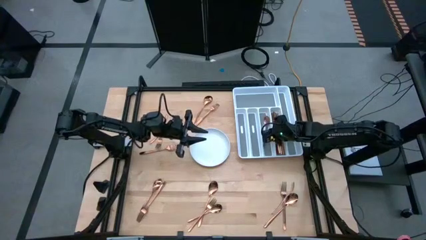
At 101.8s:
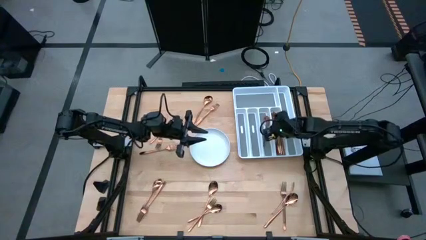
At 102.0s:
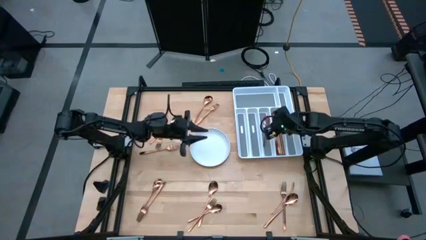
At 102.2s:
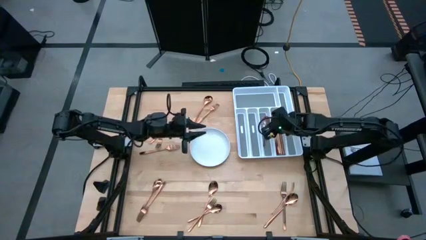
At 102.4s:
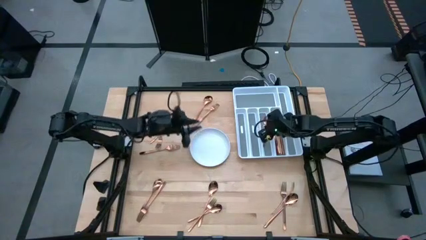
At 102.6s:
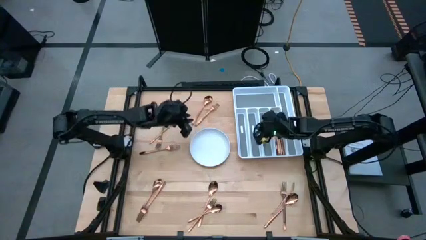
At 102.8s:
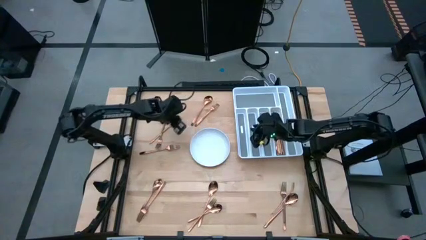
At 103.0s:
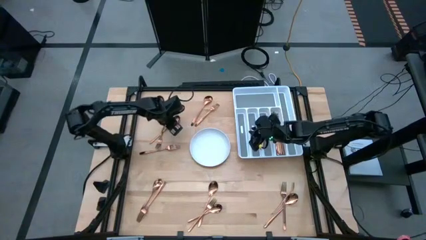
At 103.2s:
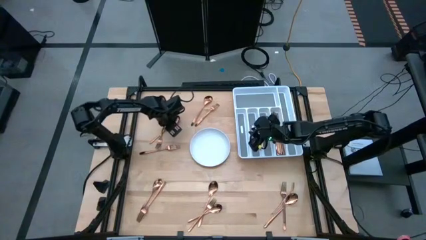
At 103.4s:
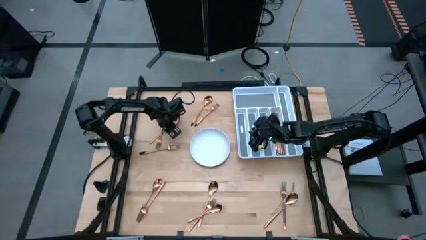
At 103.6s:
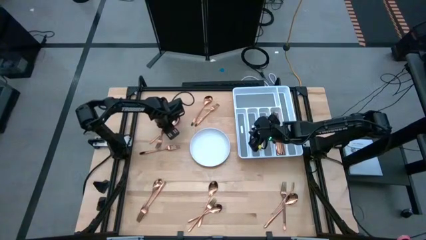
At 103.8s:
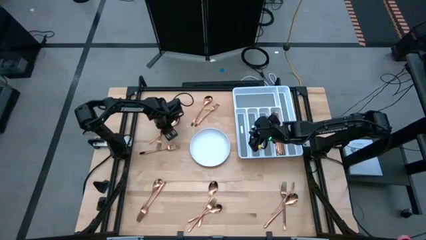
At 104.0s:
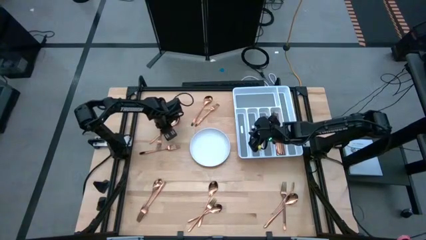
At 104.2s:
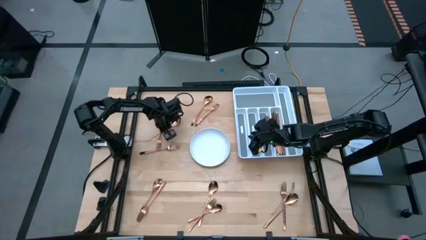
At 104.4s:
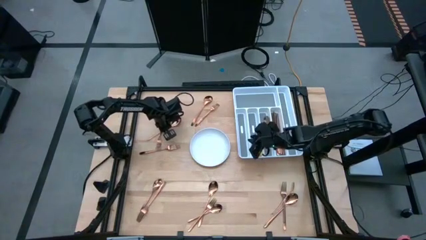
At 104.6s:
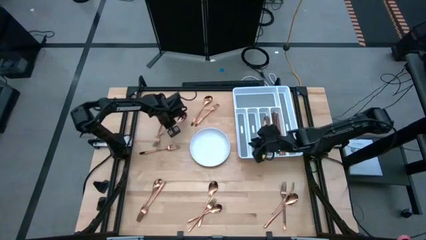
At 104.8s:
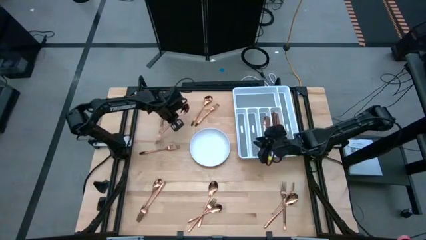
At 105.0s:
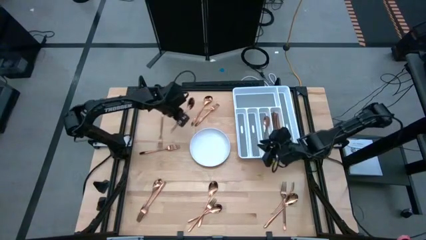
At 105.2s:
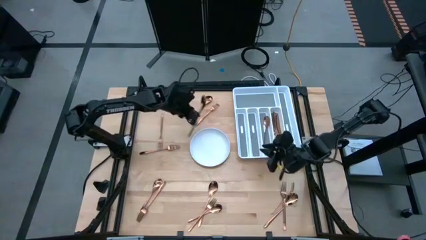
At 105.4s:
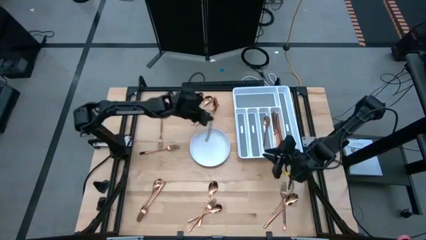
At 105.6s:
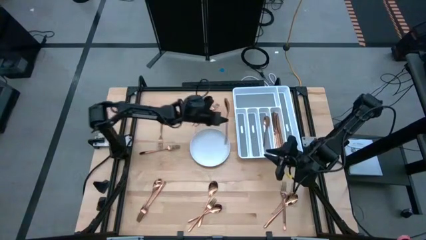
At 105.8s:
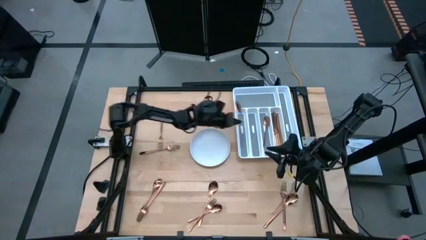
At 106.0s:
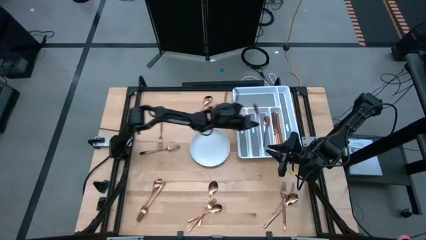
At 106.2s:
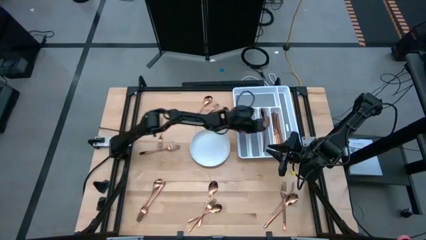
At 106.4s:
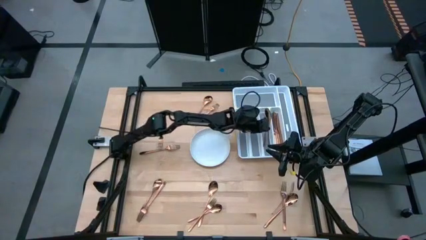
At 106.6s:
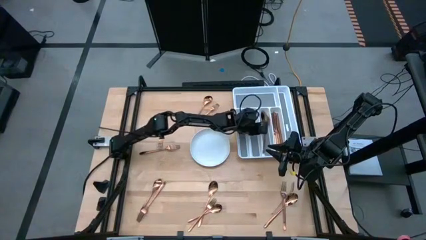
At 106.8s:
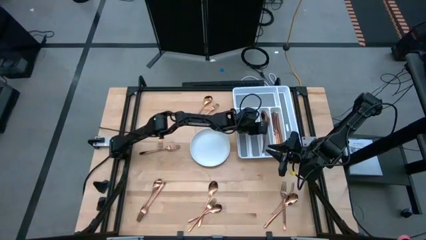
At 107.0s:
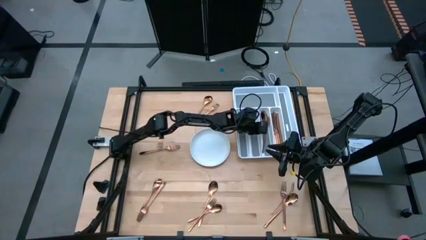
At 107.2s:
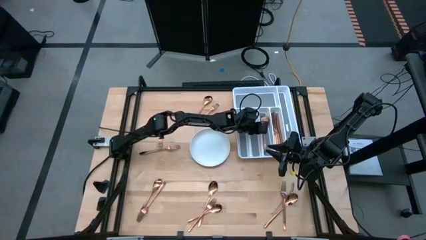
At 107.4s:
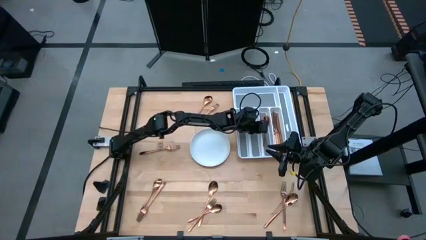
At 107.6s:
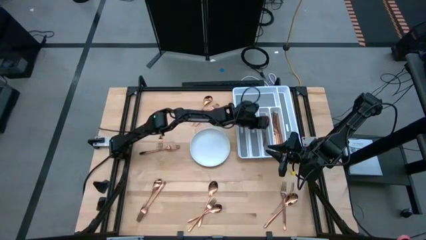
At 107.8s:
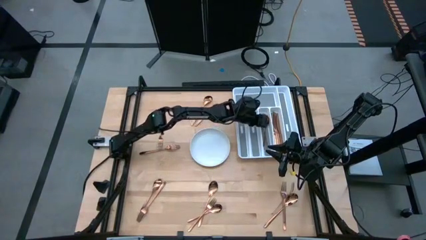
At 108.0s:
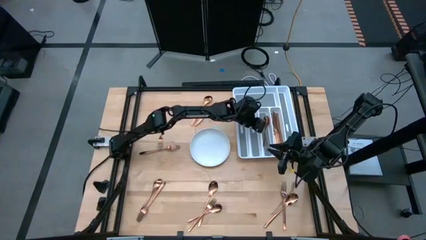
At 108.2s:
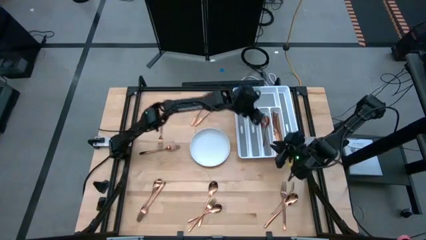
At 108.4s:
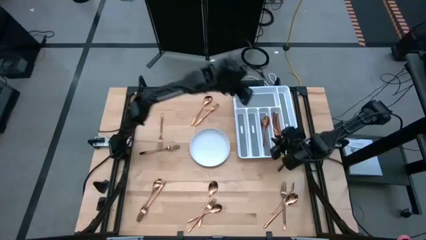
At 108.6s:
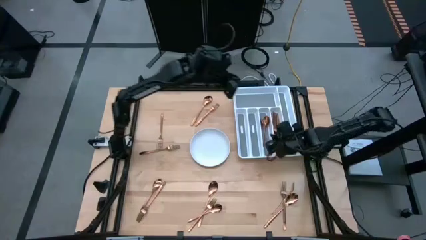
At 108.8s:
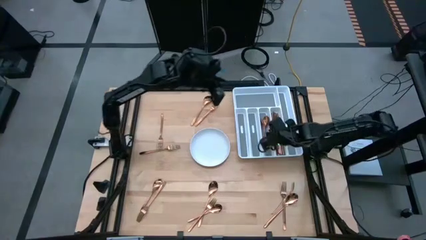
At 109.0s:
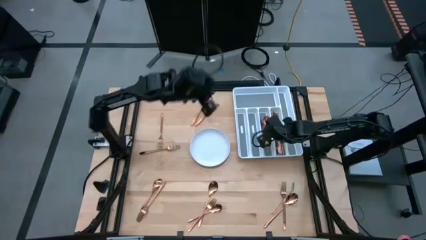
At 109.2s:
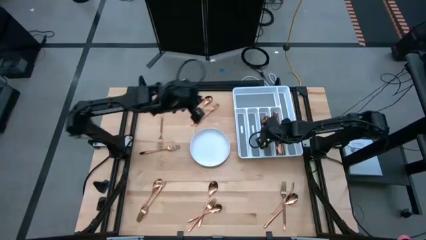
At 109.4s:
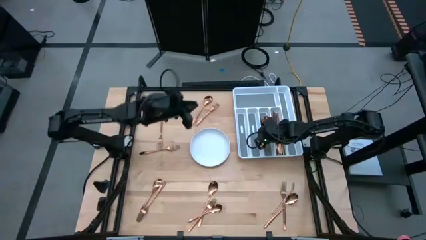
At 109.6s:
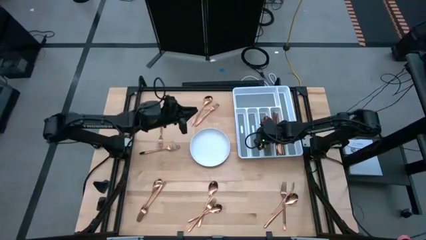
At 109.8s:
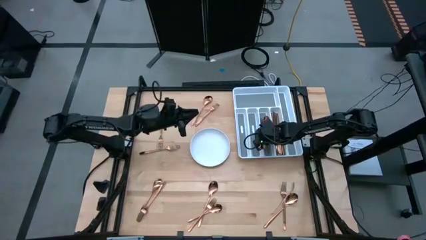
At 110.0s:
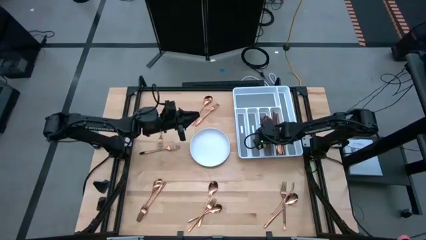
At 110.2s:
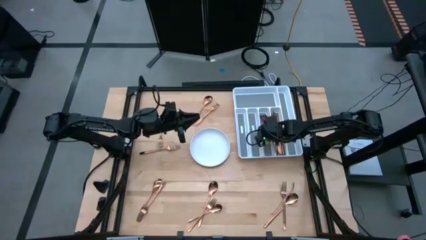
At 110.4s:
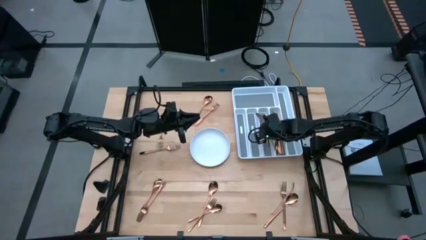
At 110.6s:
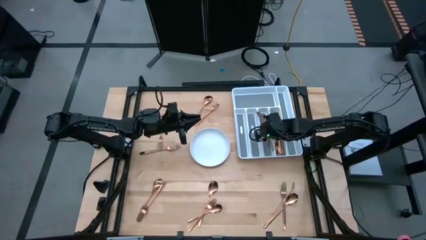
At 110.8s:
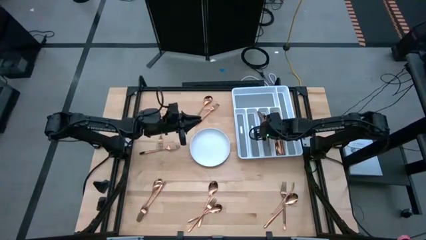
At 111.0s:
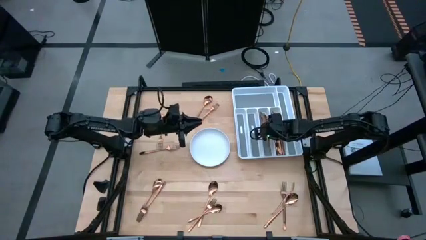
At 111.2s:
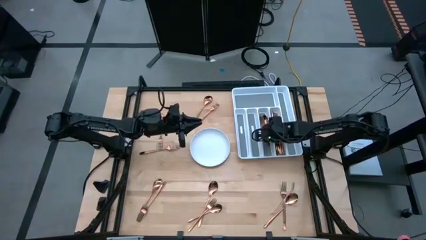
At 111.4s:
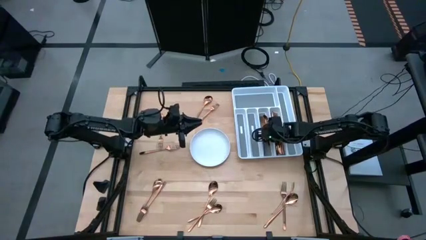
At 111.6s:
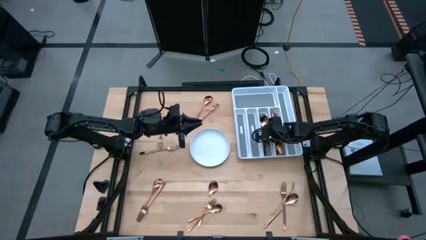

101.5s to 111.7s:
Task: Sort silverware
Put the spoon in the silverware tray

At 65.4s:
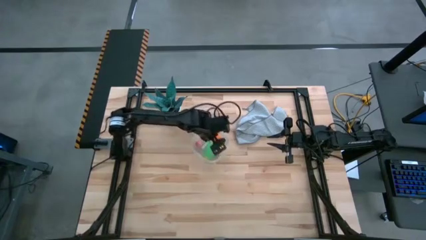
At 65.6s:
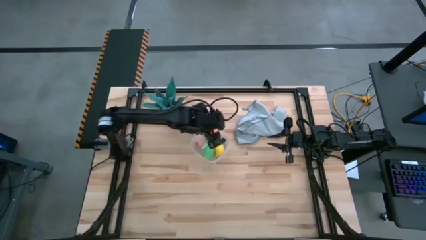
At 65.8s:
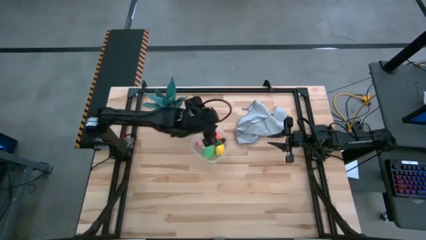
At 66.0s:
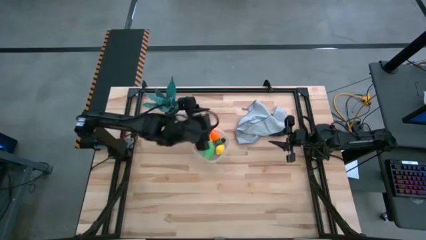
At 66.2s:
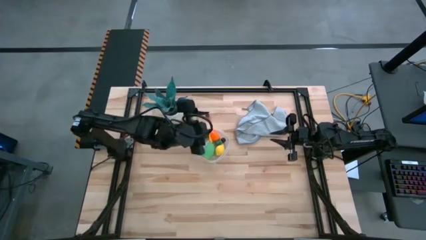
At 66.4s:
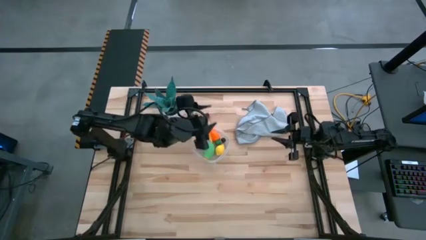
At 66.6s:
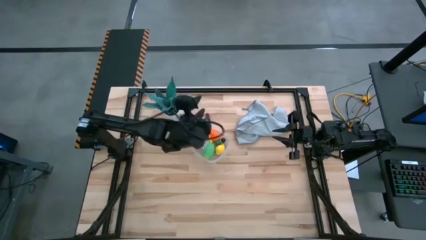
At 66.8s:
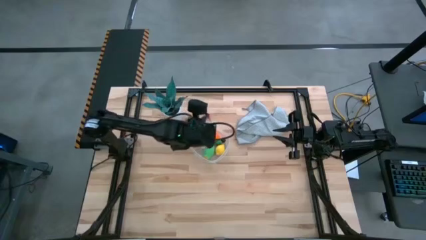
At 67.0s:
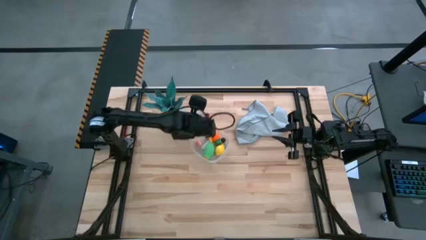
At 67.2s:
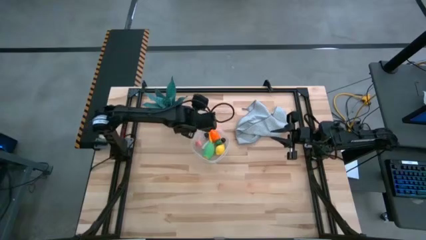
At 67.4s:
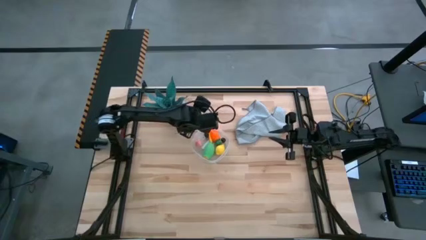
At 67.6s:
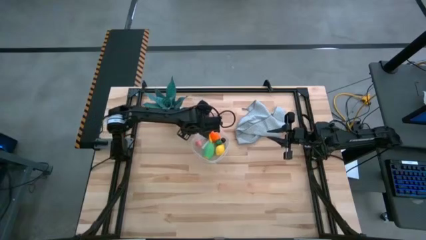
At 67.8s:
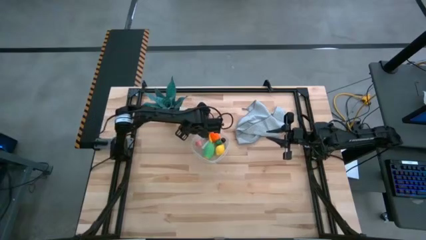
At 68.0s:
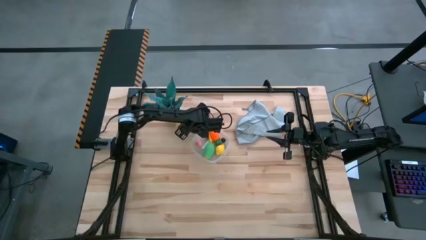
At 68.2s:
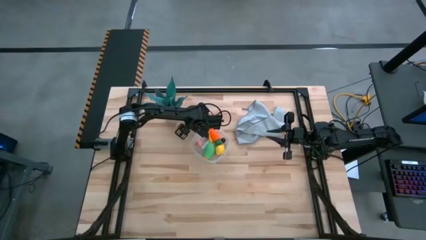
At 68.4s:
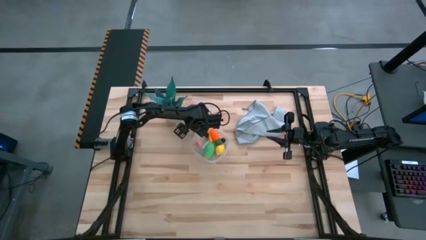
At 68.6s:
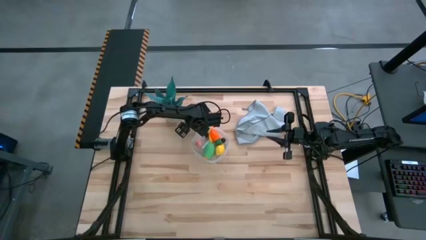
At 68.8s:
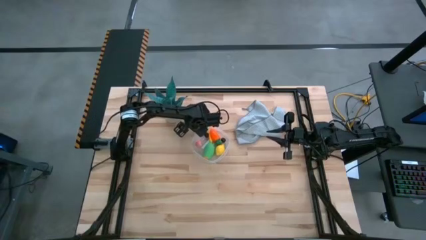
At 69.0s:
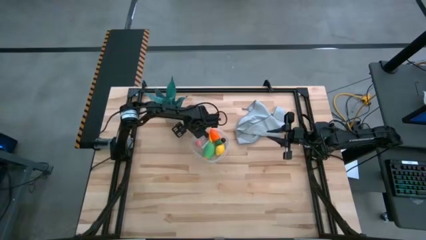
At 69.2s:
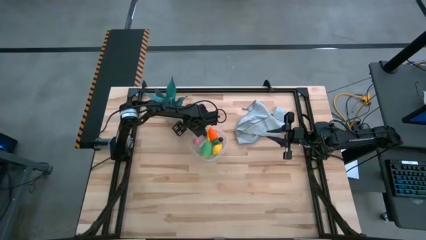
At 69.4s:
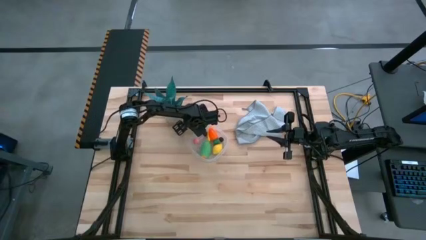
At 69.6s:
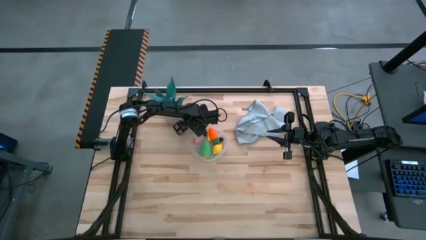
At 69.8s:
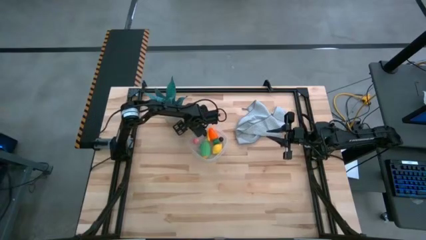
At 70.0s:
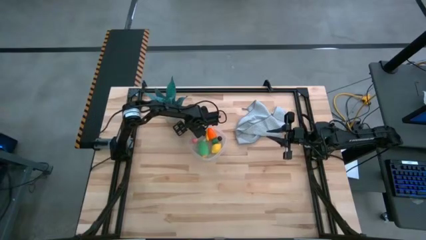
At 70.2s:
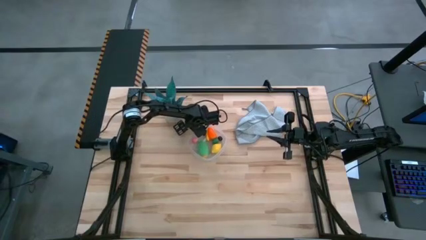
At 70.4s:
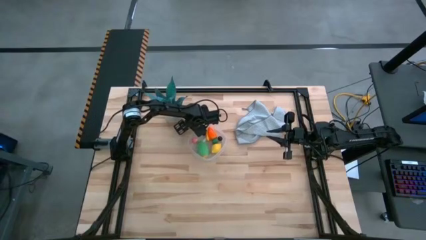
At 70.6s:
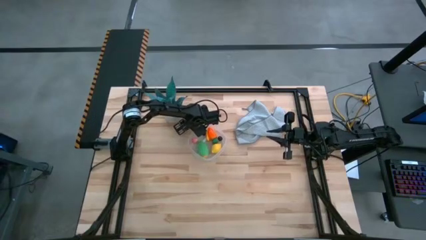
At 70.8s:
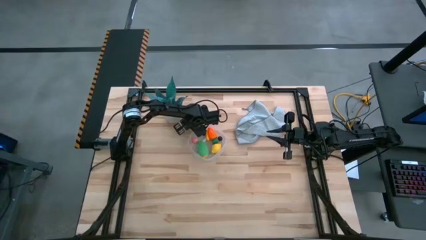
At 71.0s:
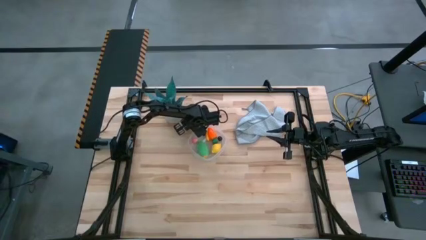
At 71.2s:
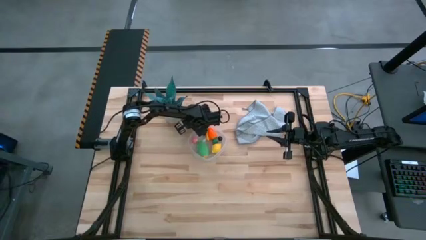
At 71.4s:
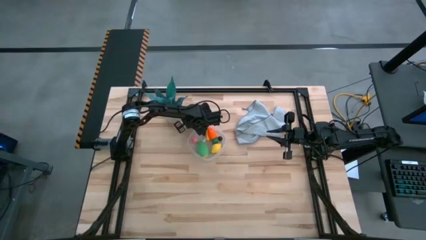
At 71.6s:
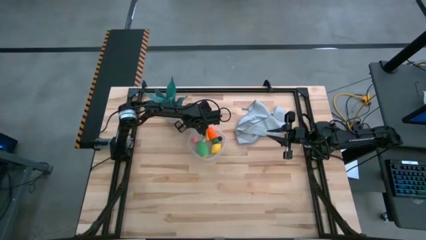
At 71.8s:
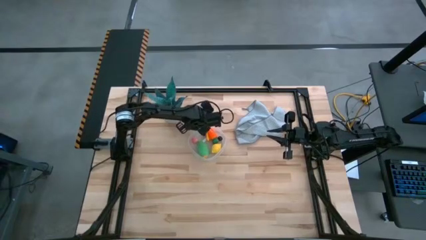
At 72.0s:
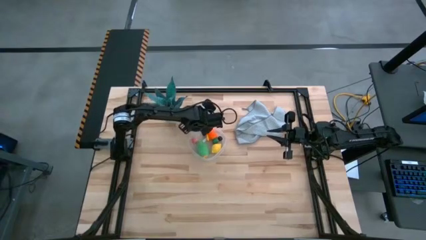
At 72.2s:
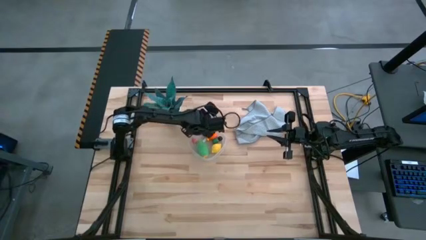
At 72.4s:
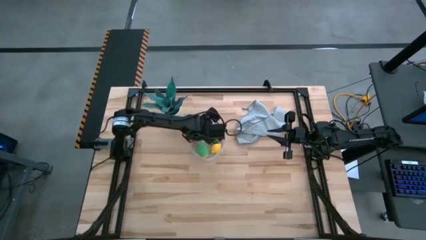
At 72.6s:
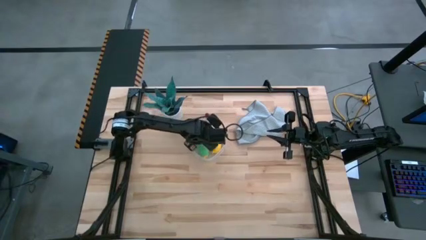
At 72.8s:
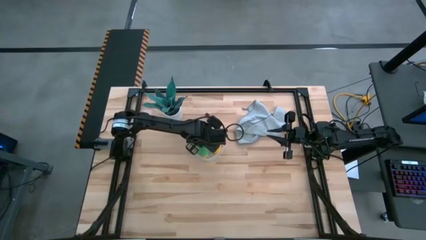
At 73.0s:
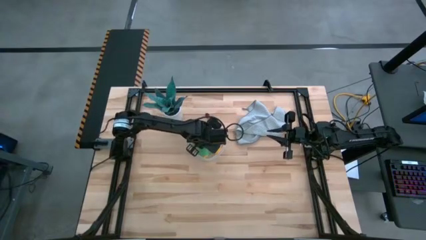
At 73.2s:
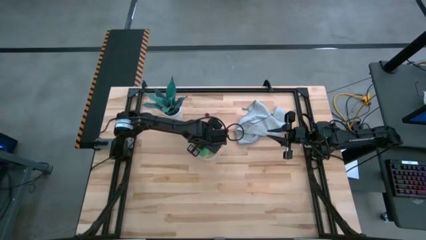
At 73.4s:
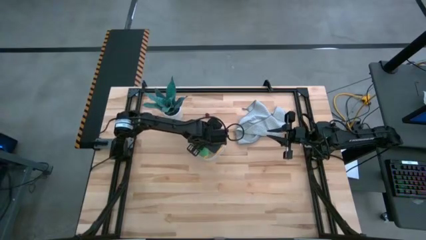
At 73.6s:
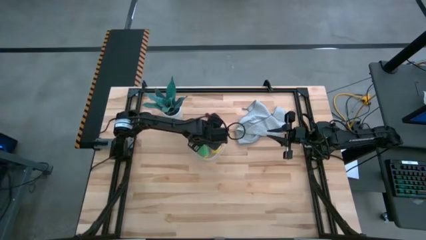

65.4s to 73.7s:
Task: Pick and placing Produce into tupperware
Put the red strawberry into the transparent bin
